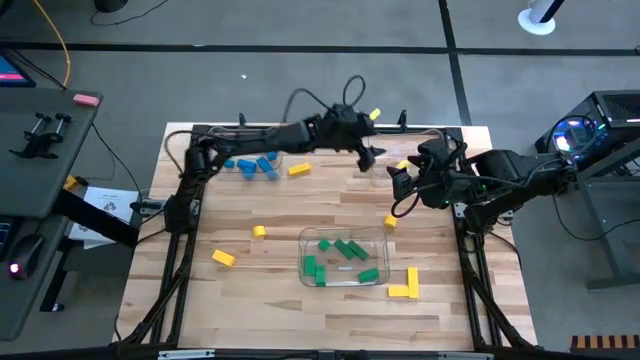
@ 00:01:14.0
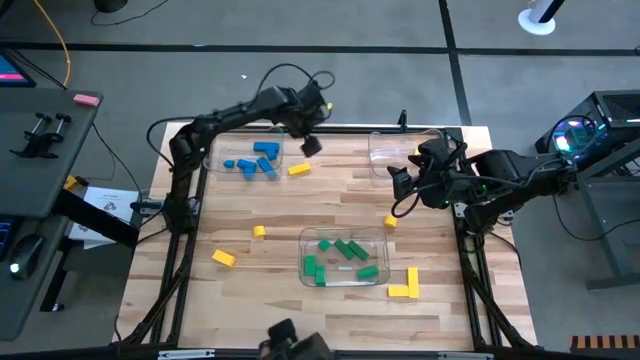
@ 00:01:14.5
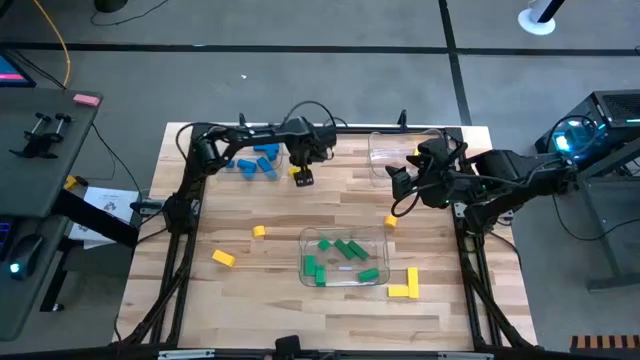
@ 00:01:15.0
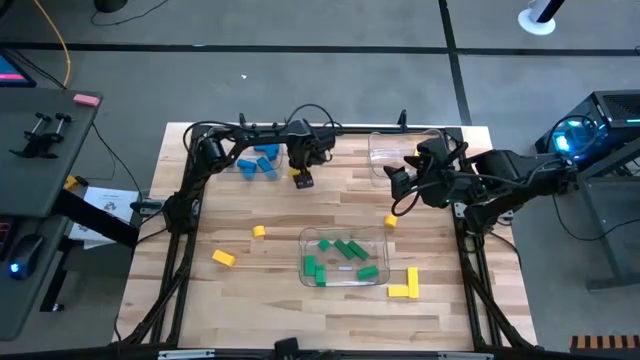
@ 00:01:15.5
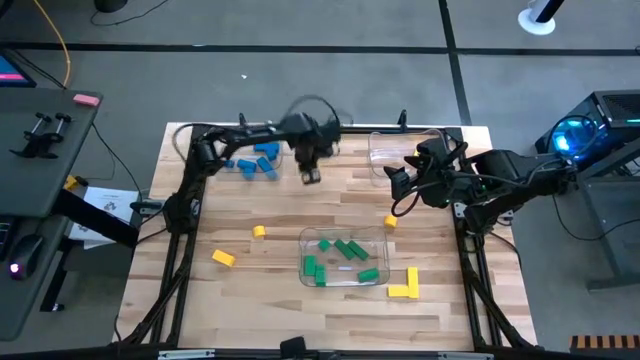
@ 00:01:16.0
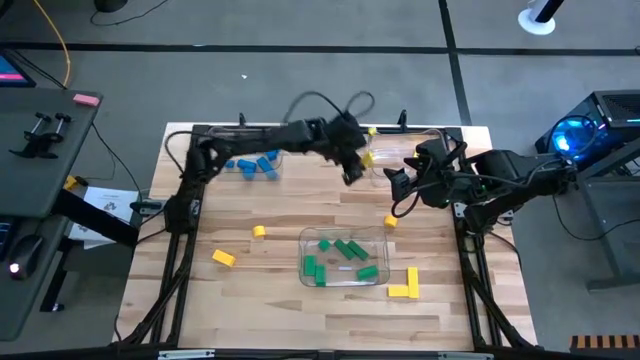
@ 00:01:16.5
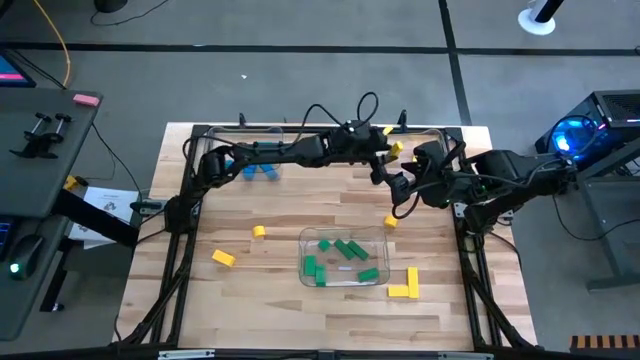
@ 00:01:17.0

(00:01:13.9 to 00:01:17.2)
Task: Sort blocks
Put the yellow block into the right transparent bin

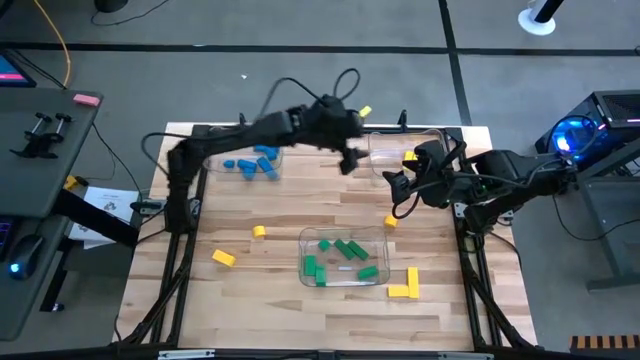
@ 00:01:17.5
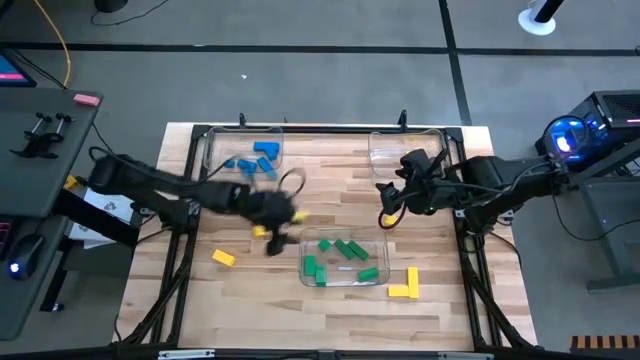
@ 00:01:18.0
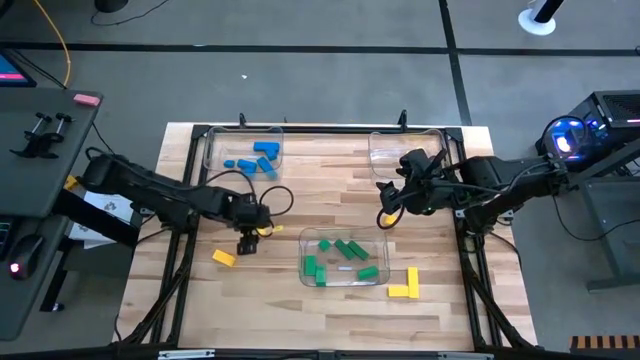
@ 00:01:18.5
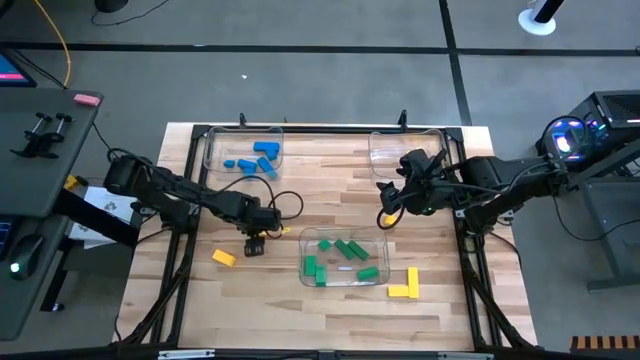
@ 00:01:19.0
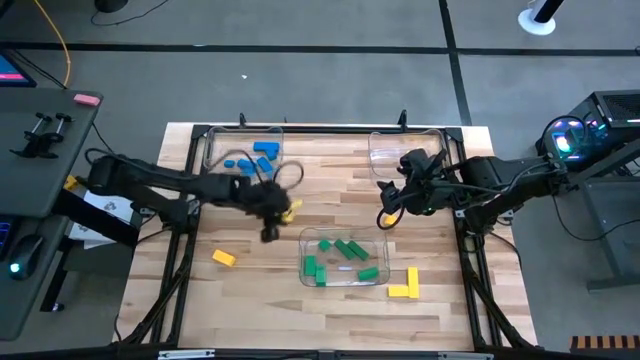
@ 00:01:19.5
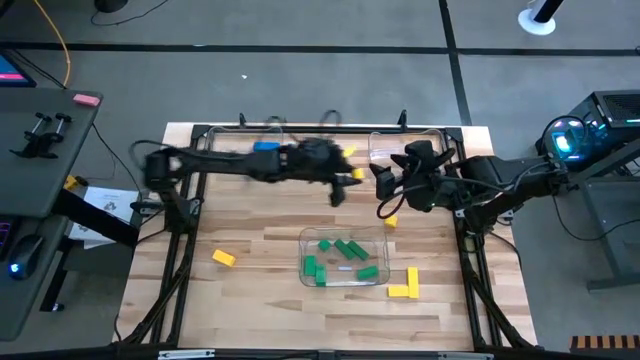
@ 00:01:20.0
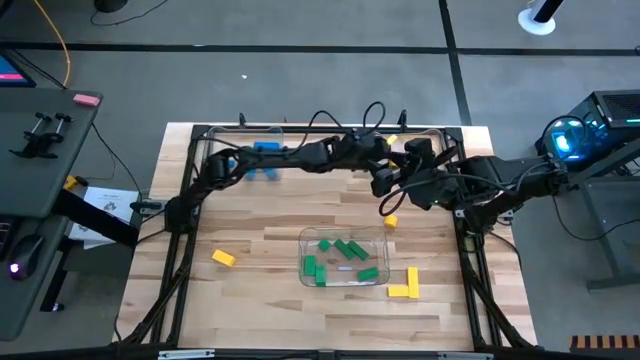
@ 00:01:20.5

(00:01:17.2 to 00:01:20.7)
Put the yellow block into the right transparent bin

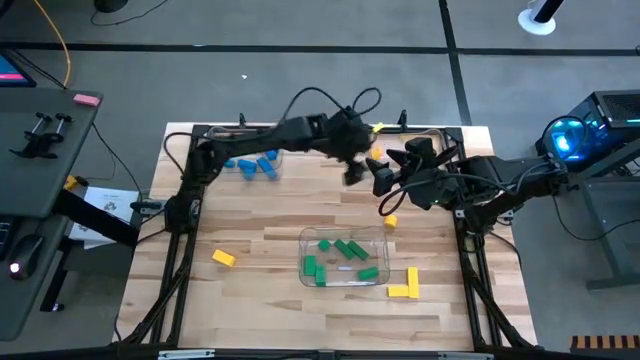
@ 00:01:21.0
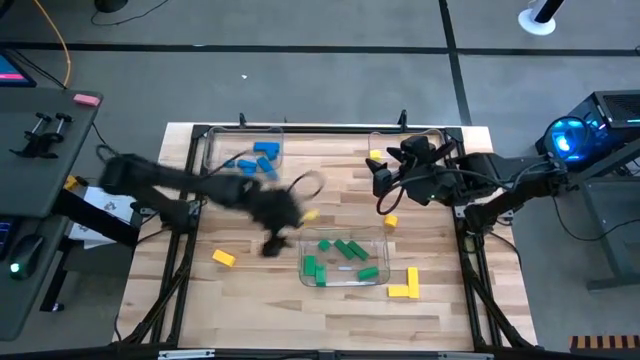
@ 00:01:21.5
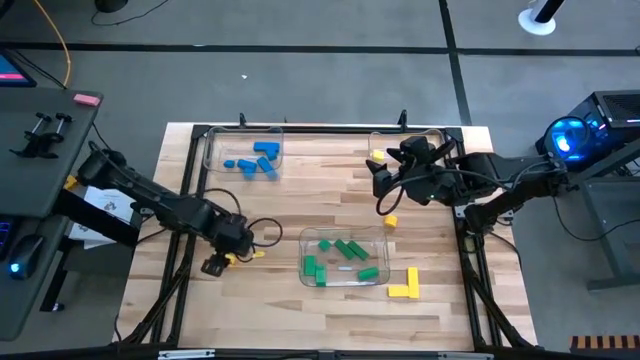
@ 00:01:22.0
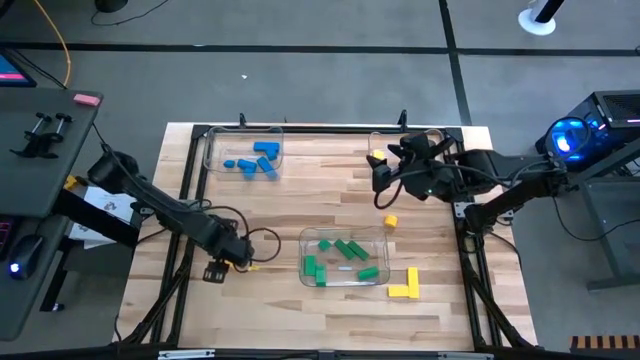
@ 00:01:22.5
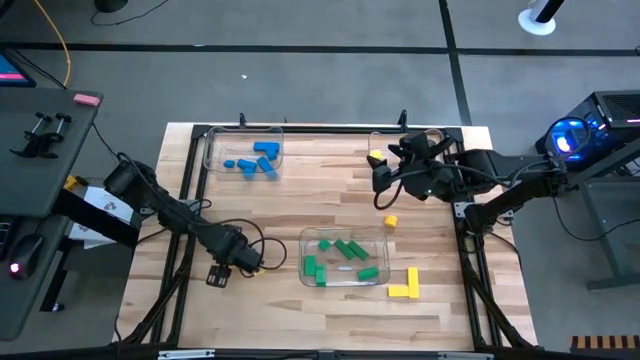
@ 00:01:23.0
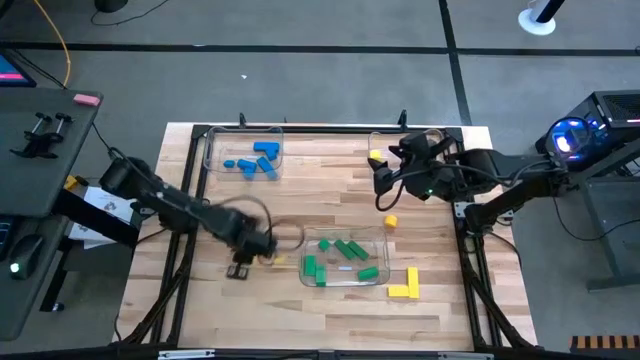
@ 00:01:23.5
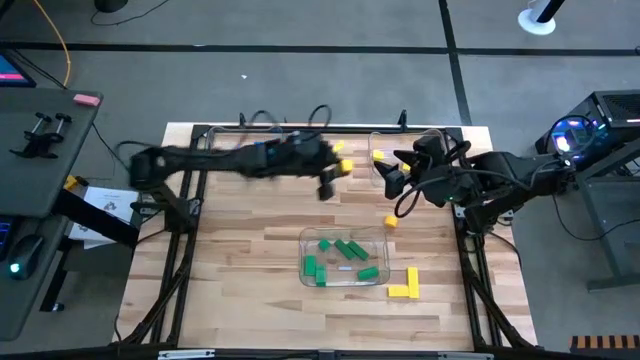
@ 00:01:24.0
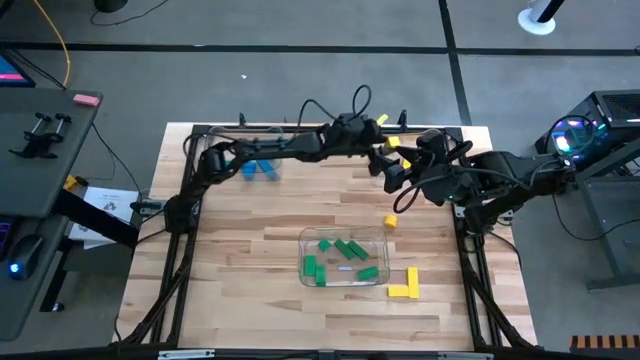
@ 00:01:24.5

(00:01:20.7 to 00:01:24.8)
Put the yellow block into the right transparent bin

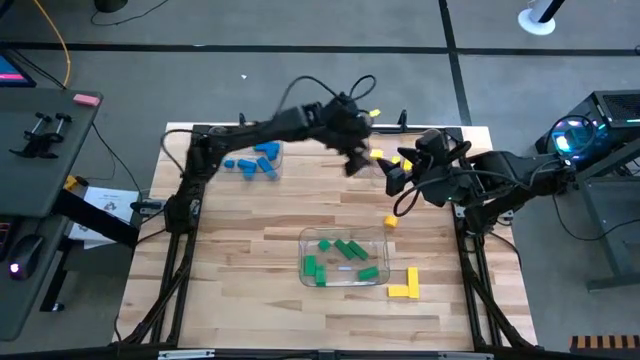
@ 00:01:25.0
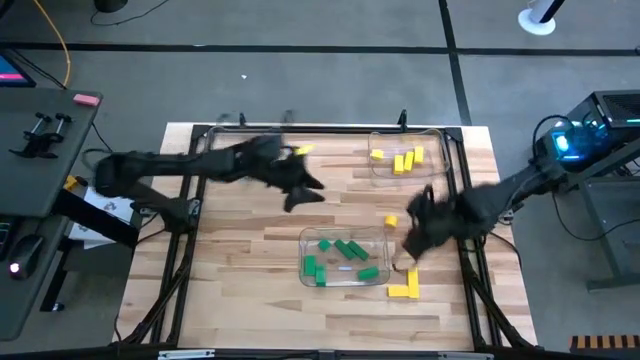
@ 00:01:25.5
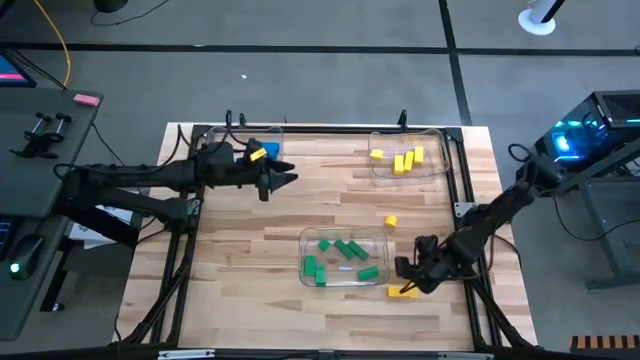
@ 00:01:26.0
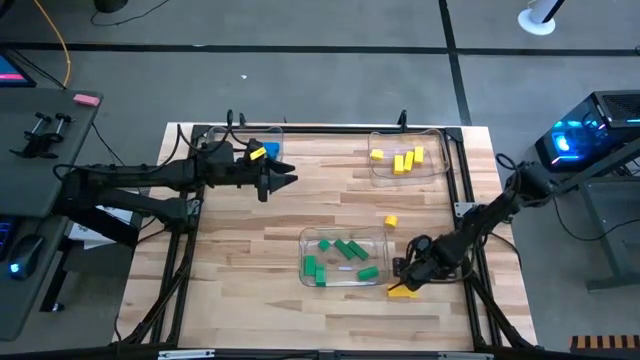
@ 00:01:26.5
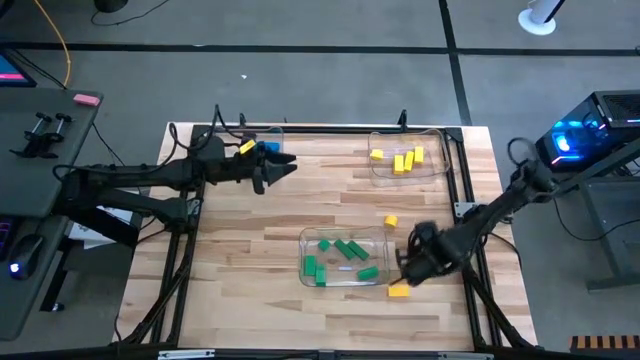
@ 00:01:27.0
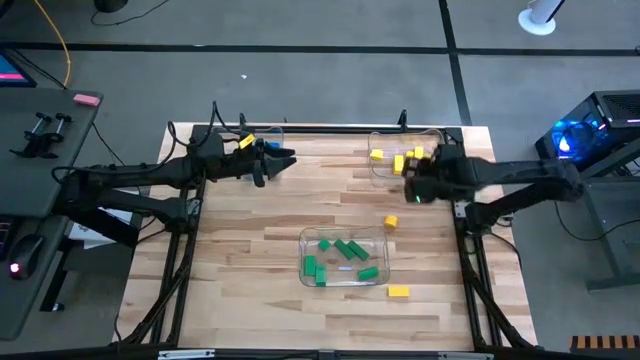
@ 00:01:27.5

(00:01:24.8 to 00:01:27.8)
Put the yellow block into the right transparent bin

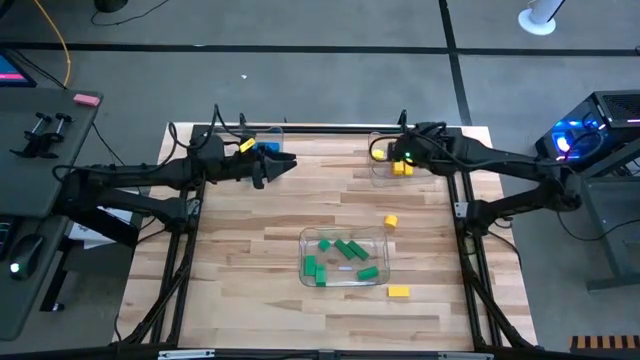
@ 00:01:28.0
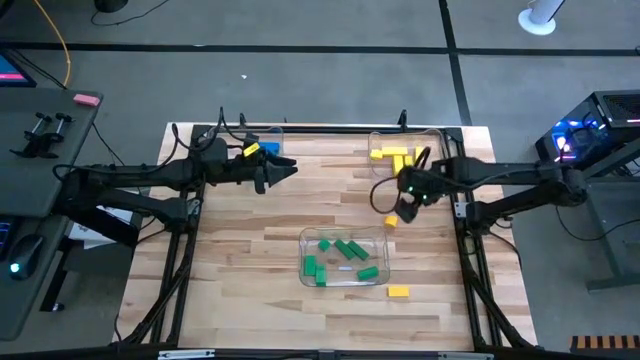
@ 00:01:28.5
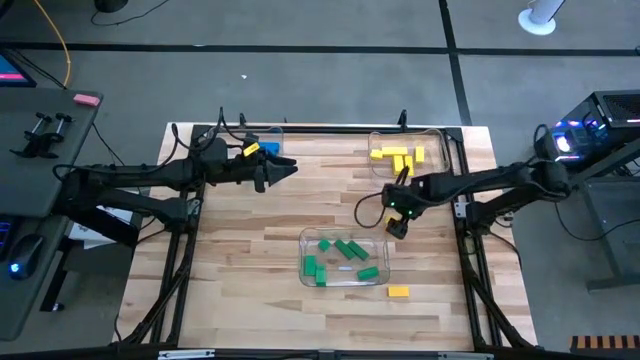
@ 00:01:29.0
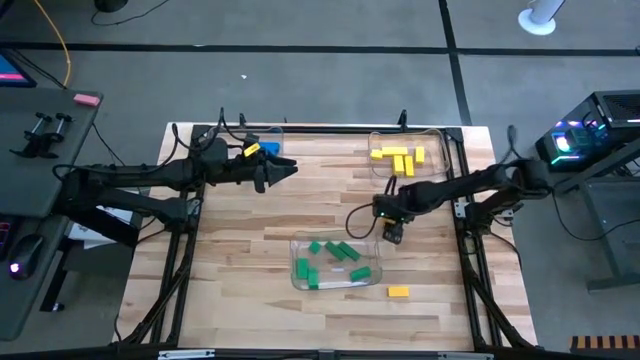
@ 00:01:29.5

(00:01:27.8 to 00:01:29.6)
Put the yellow block into the right transparent bin

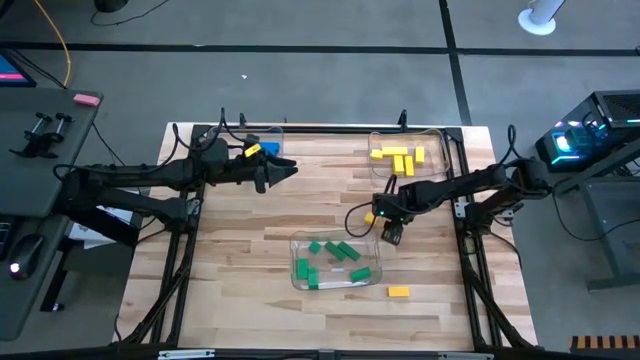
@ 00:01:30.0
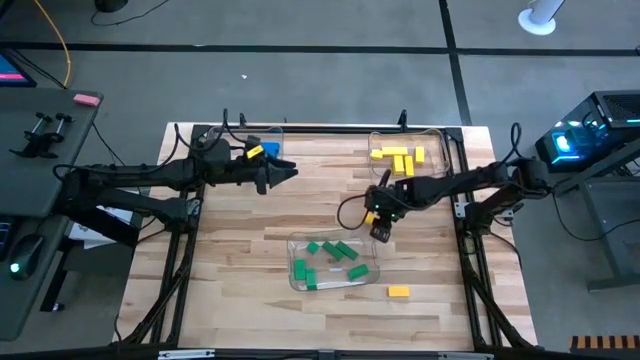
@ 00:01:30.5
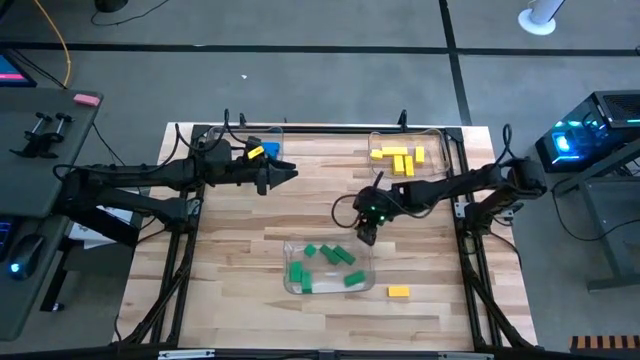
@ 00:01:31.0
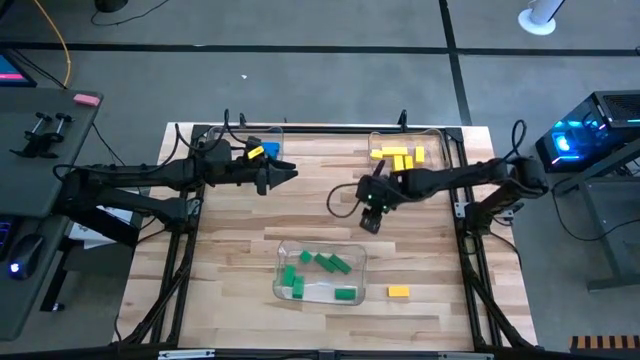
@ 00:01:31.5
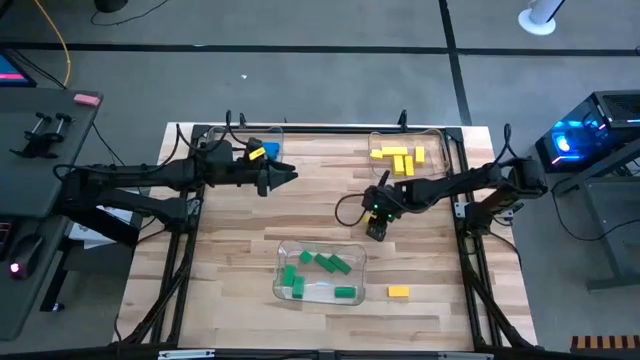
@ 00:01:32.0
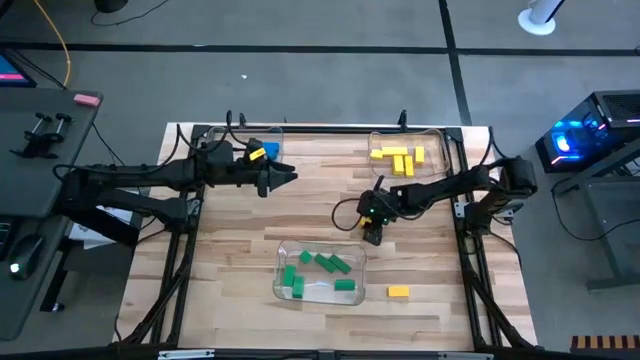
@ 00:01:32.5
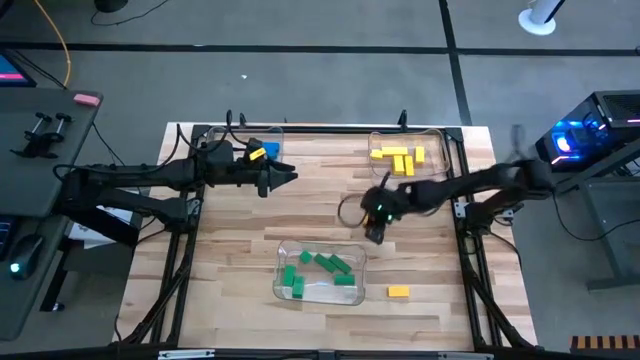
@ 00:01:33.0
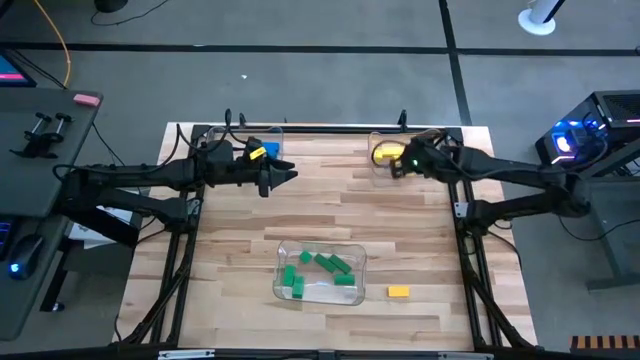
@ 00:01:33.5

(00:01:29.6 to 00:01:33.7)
Put the yellow block into the right transparent bin

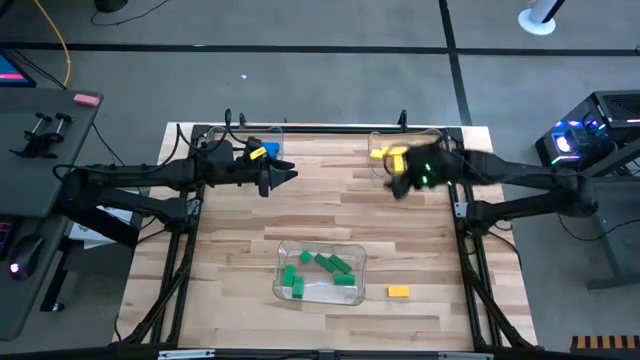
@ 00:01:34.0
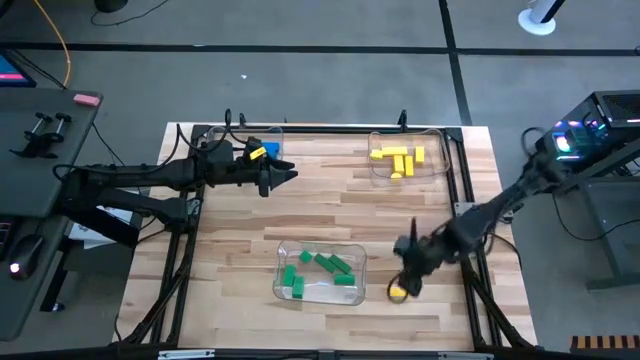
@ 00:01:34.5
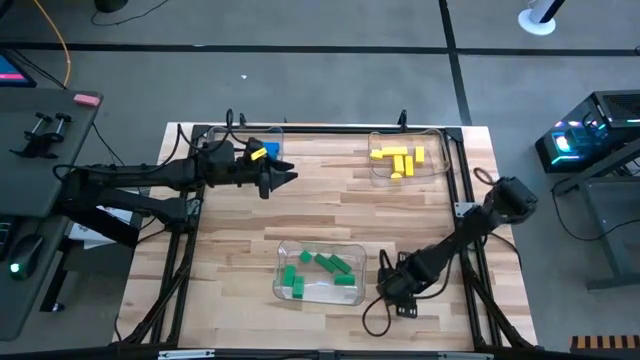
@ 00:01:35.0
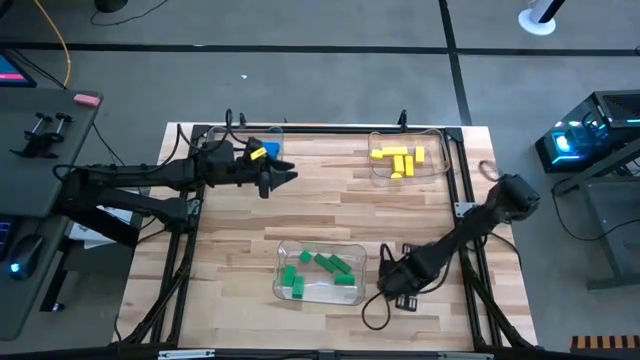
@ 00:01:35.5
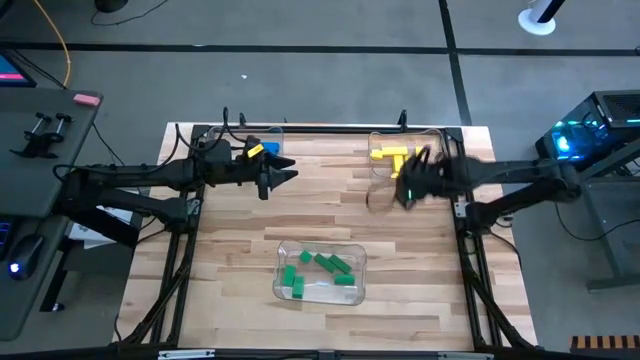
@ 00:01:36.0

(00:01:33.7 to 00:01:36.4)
Put the yellow block into the right transparent bin
